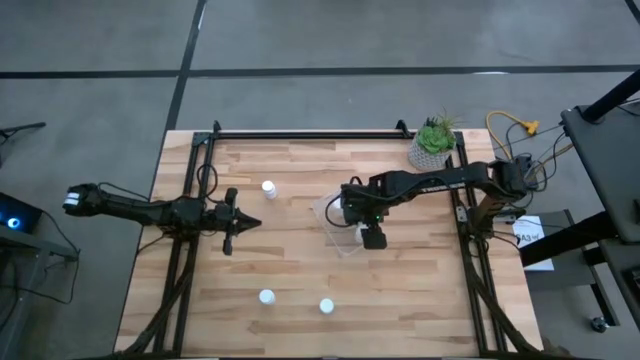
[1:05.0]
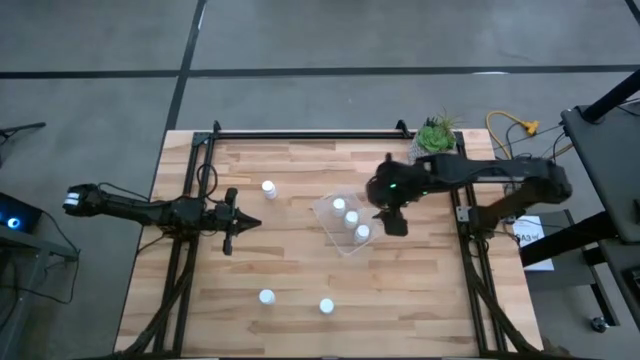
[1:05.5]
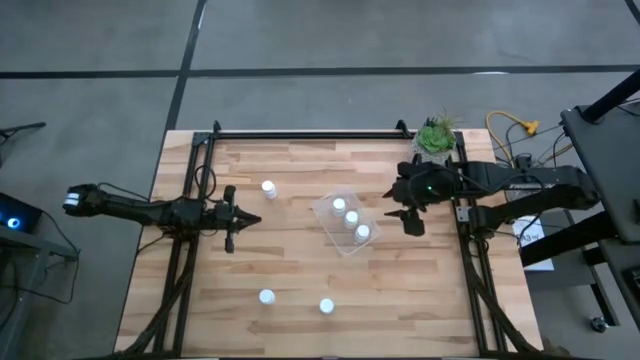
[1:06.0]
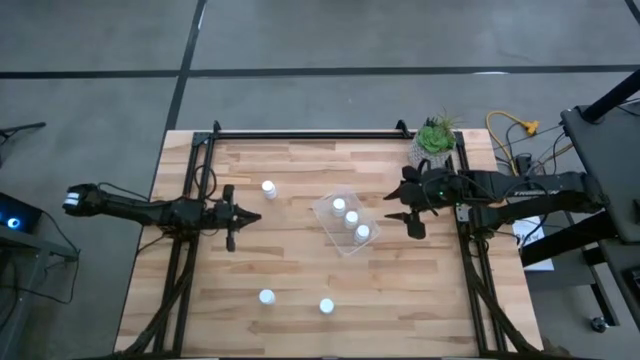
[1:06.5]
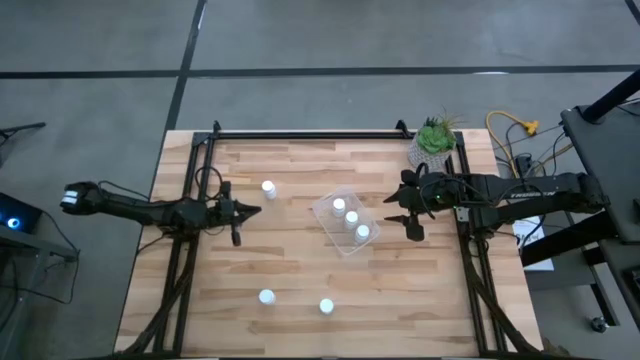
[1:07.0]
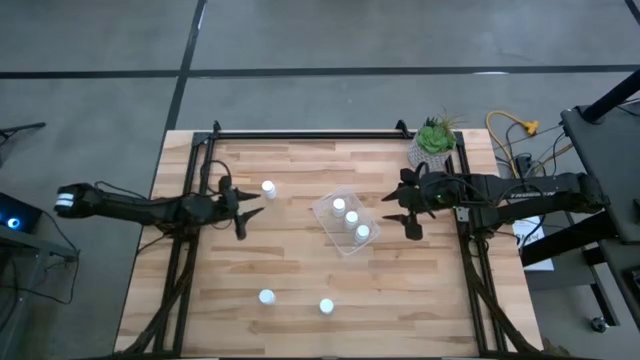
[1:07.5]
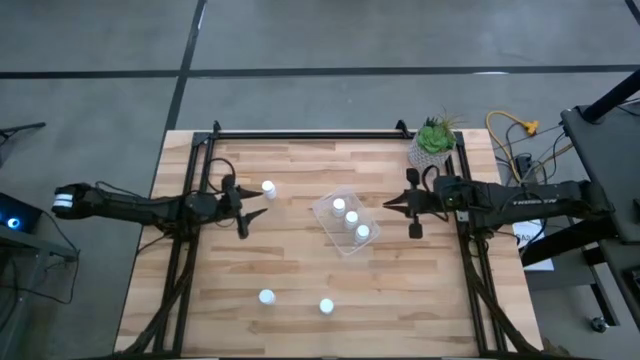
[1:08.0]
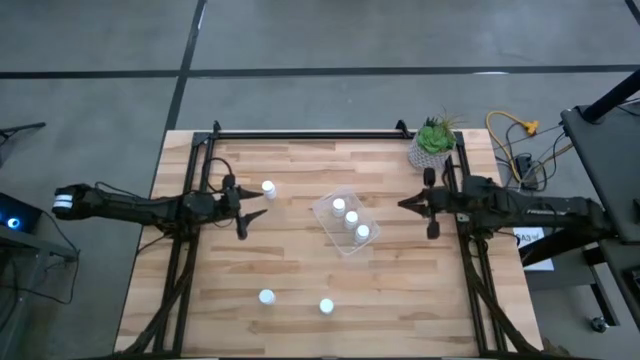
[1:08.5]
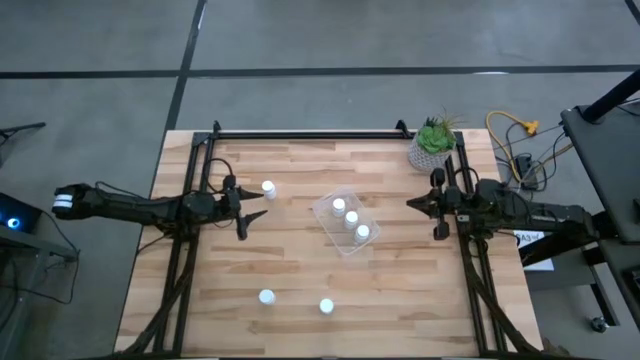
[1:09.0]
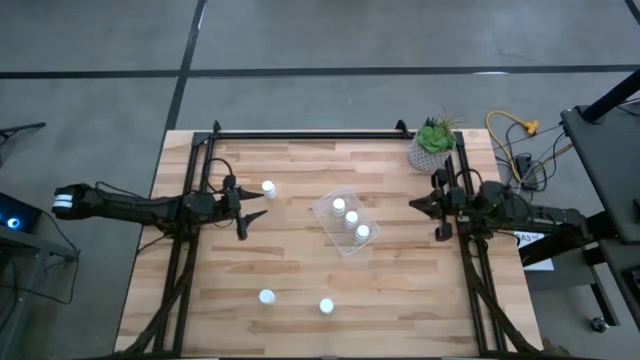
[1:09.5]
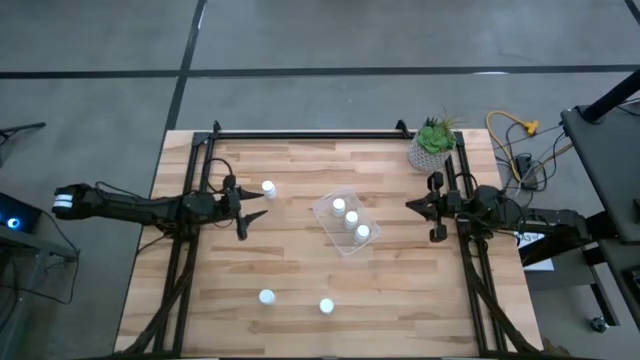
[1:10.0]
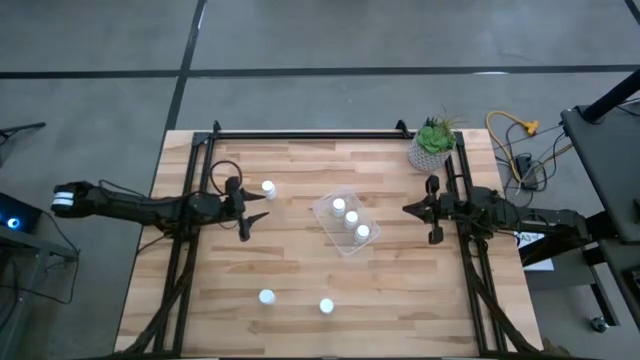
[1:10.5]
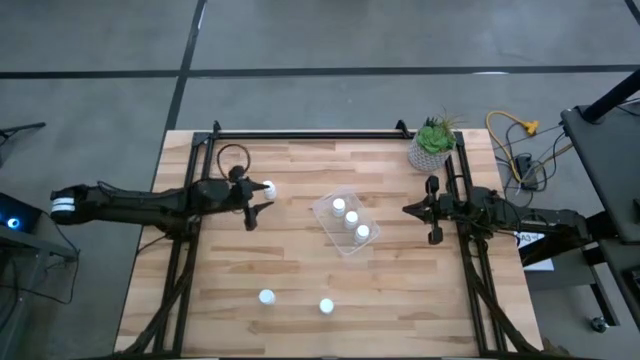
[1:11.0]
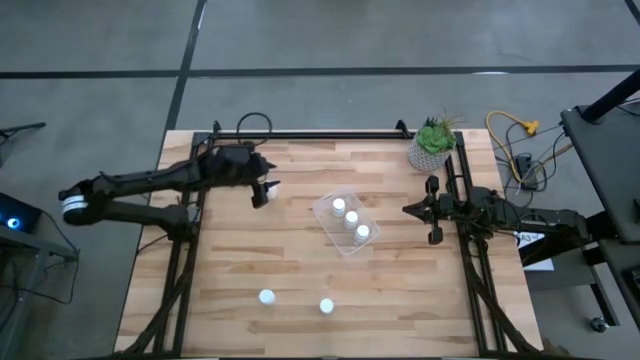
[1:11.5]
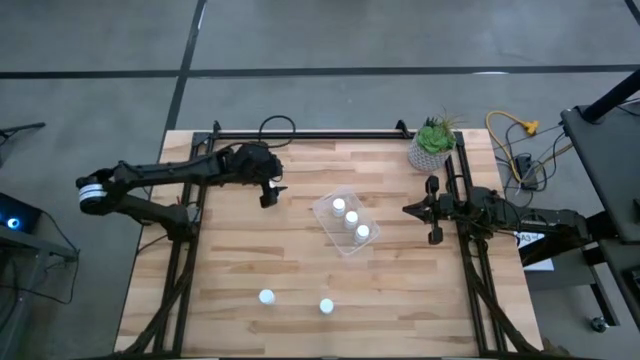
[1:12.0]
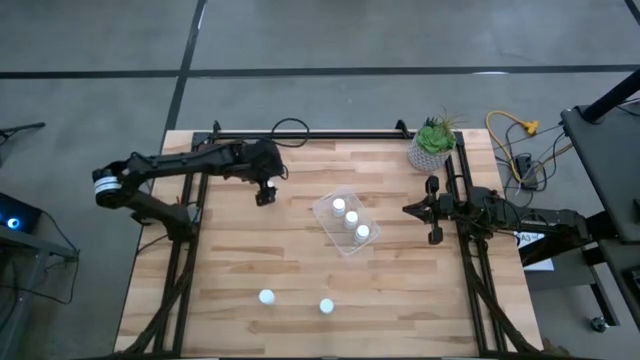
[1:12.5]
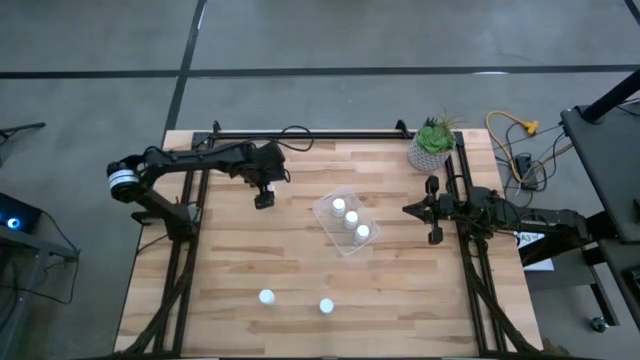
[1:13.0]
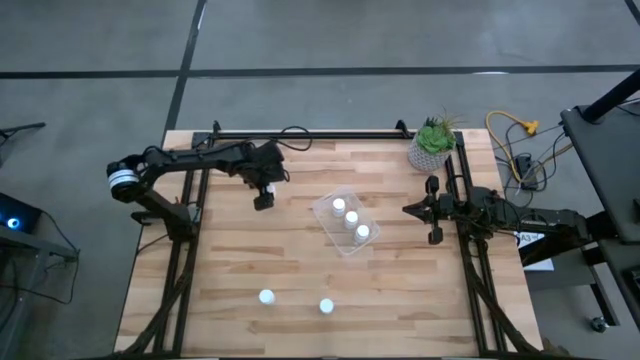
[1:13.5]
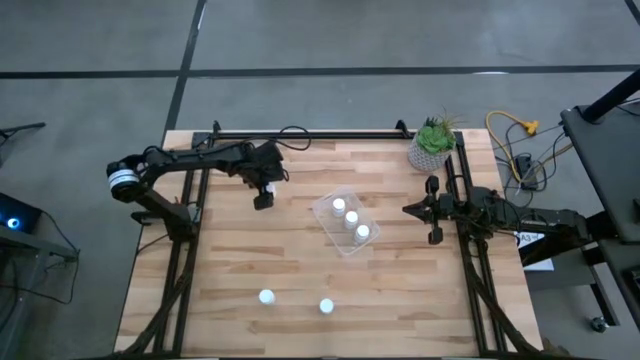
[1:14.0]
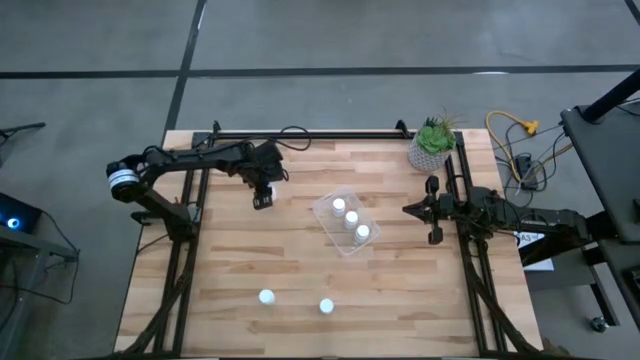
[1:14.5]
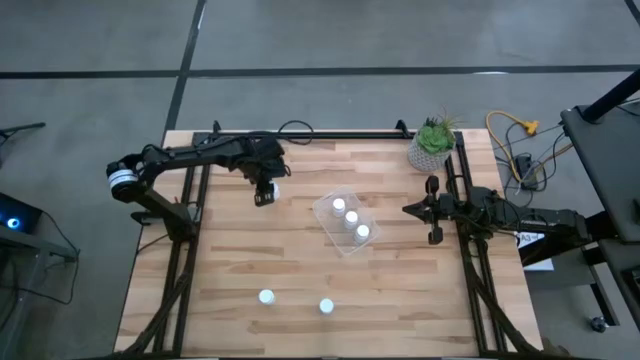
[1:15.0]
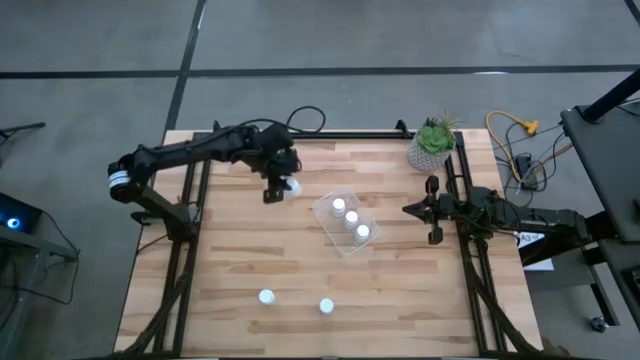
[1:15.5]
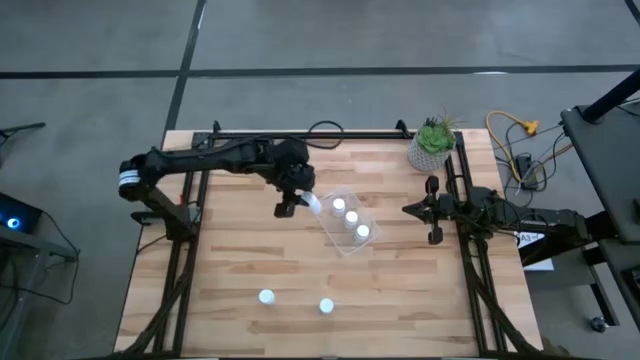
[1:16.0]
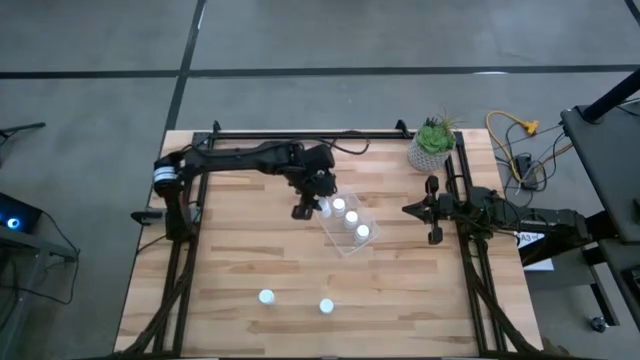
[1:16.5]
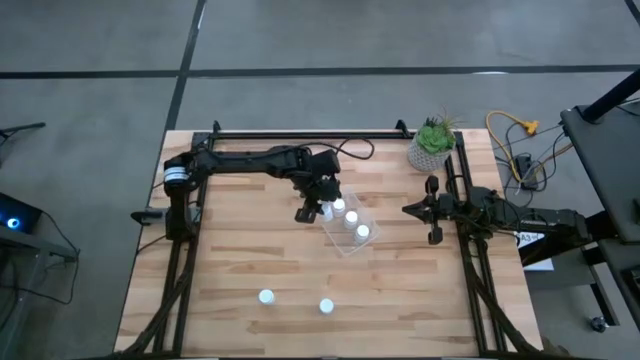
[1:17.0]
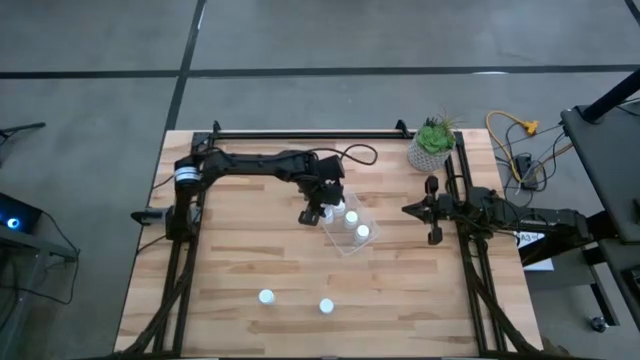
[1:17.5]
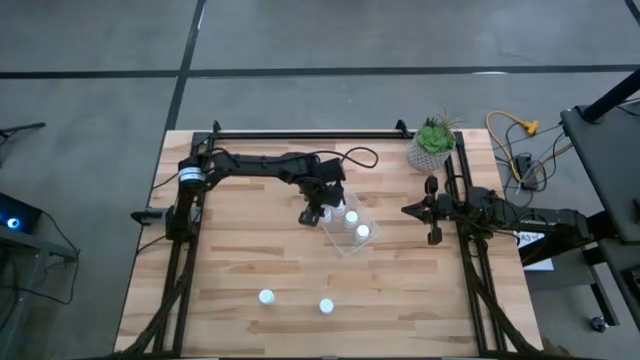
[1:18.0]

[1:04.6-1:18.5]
Task: Pick and place pill bottles into a basket
Put the white pill bottle into the transparent bin

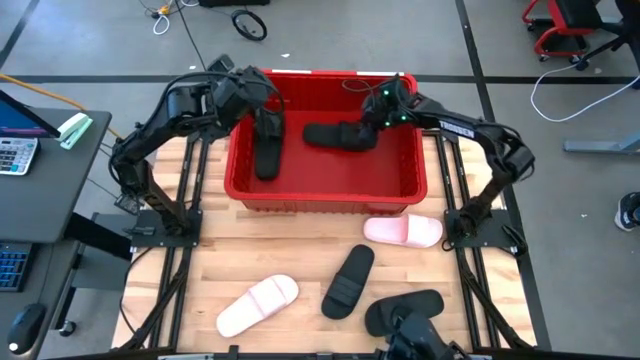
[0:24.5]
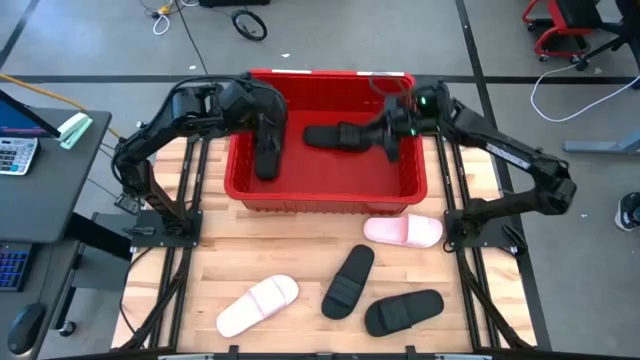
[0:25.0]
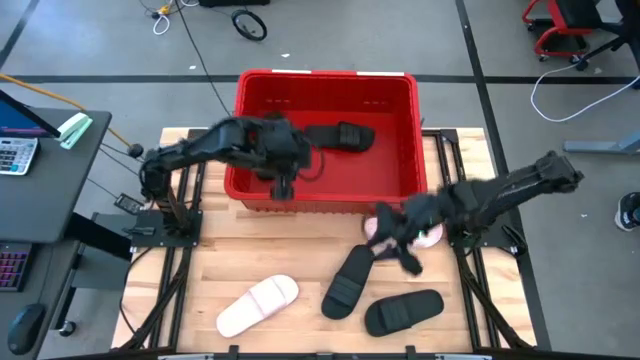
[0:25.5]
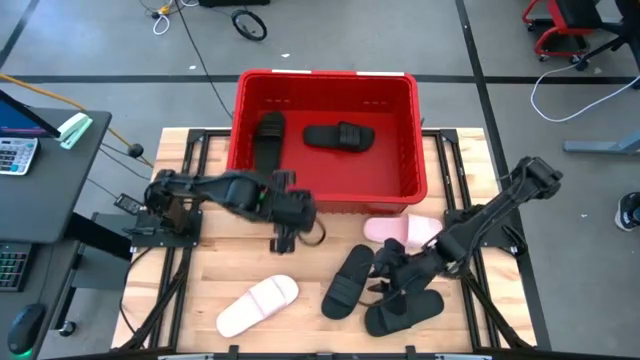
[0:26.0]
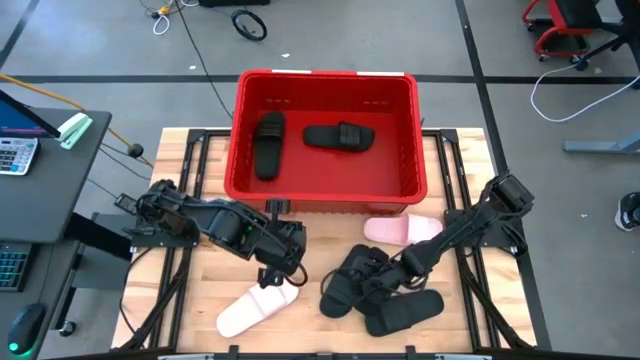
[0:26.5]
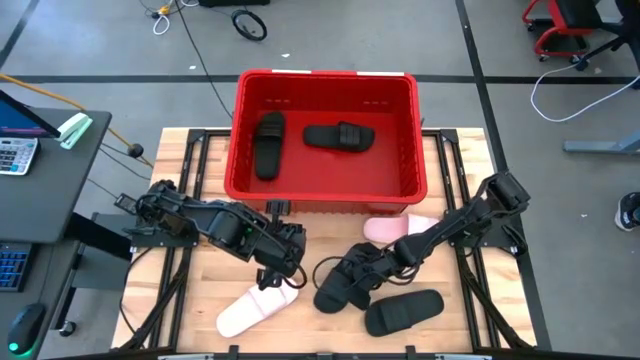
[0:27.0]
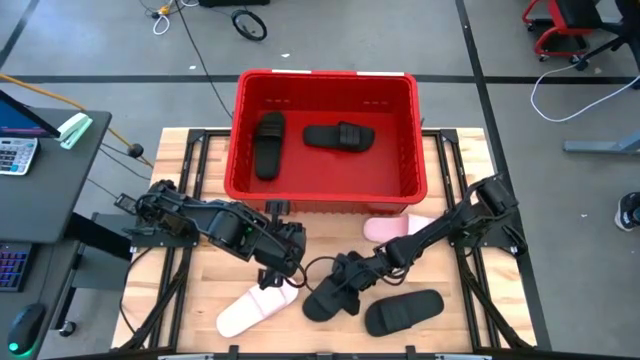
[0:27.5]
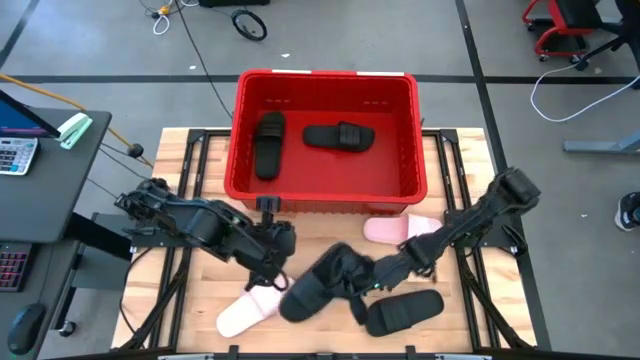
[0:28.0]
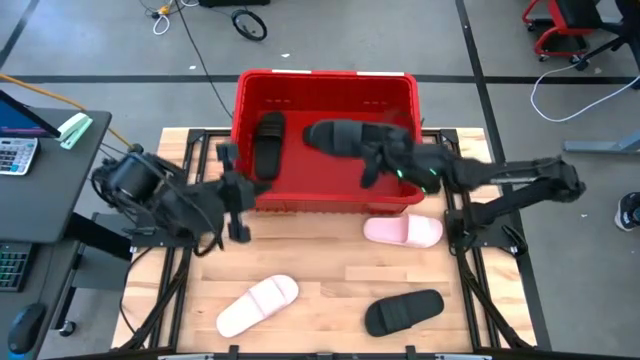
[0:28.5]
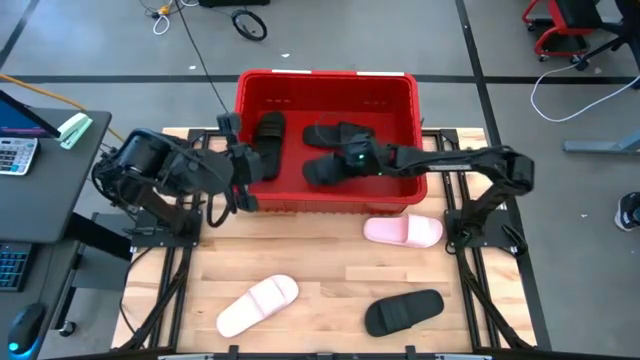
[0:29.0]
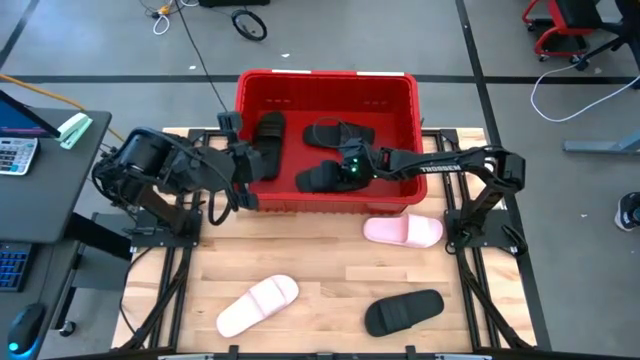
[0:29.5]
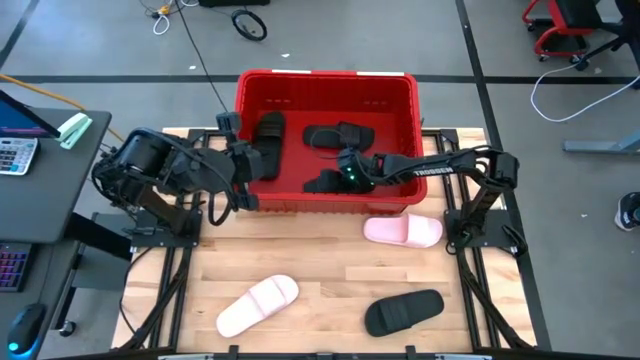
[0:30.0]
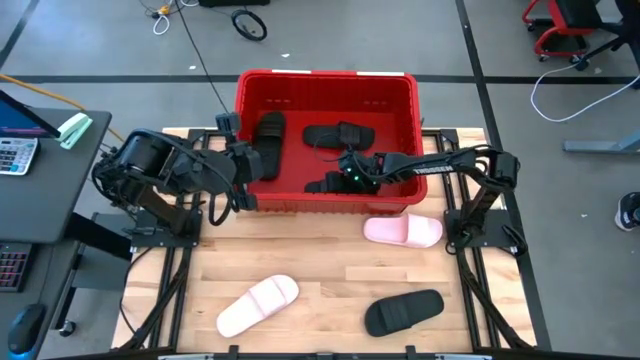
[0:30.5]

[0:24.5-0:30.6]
Task: Pick and place slides into bin
Put the black slipper into the red bin
